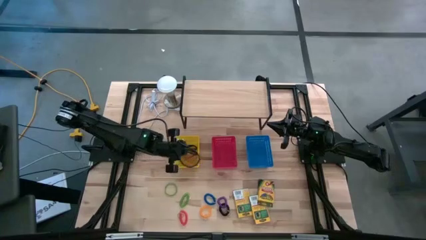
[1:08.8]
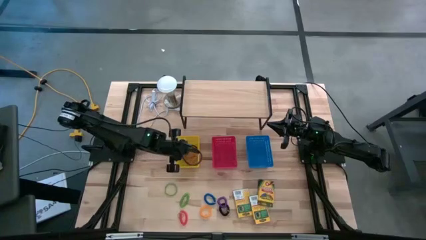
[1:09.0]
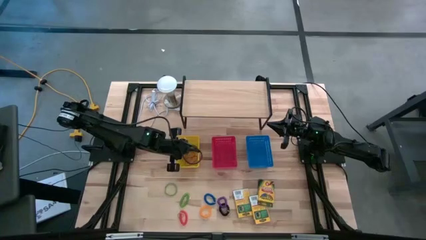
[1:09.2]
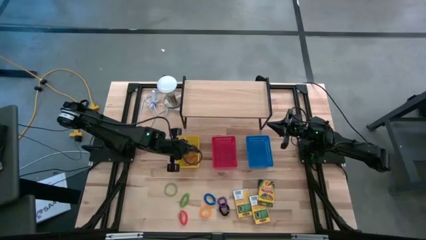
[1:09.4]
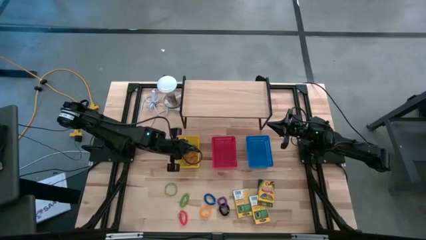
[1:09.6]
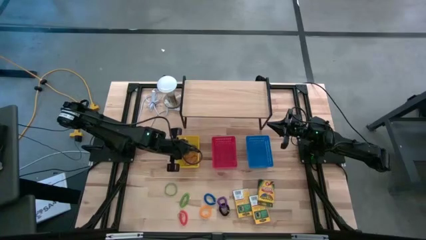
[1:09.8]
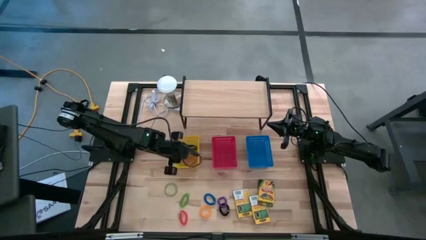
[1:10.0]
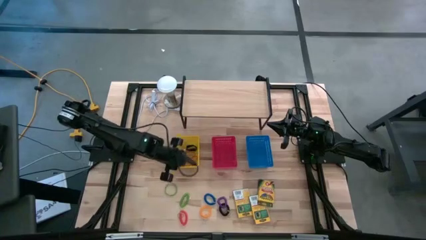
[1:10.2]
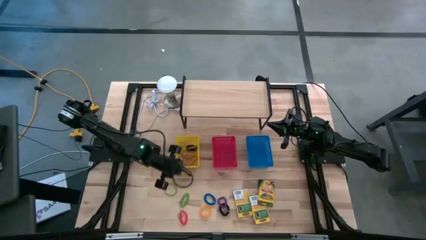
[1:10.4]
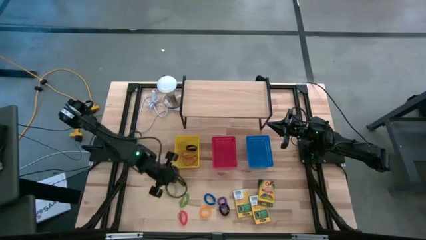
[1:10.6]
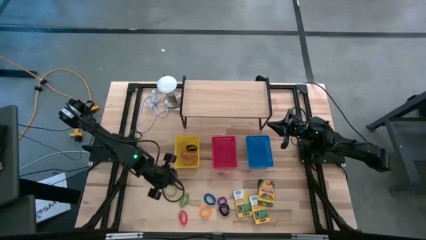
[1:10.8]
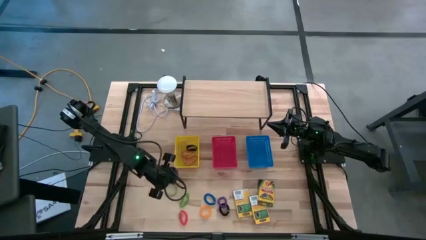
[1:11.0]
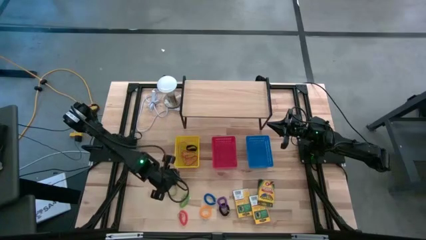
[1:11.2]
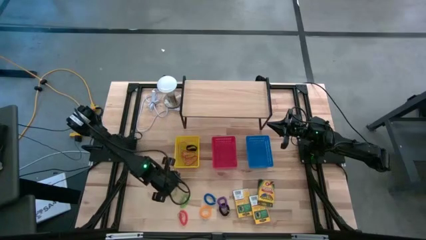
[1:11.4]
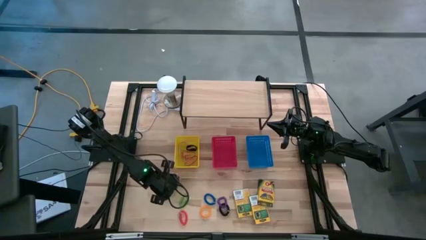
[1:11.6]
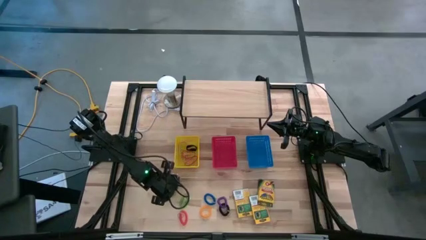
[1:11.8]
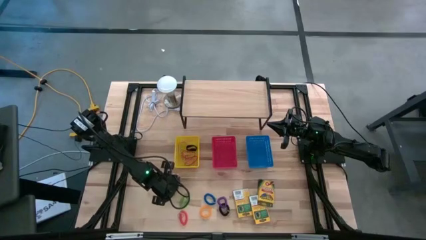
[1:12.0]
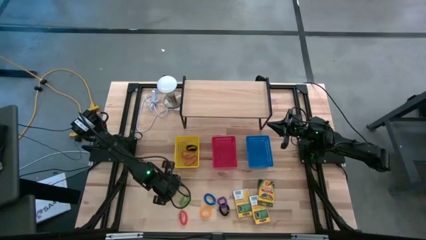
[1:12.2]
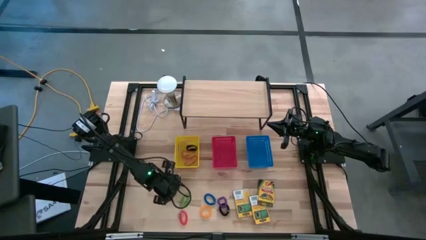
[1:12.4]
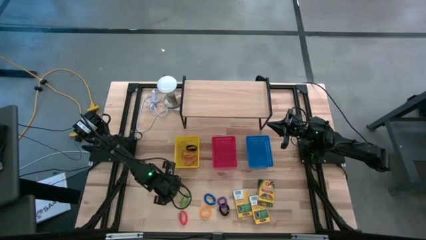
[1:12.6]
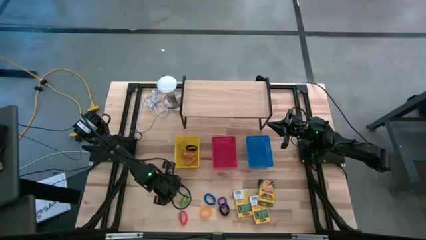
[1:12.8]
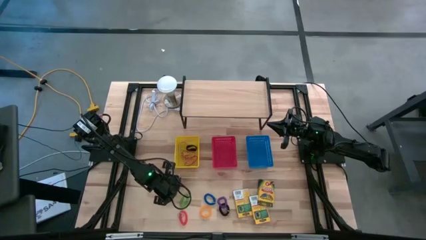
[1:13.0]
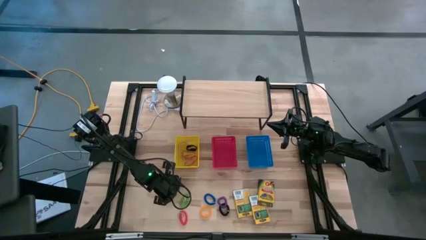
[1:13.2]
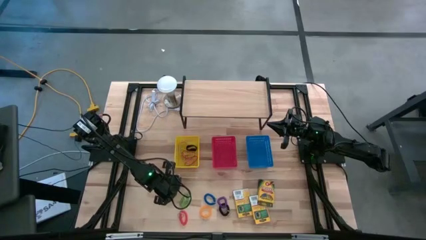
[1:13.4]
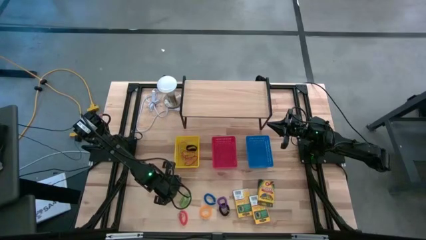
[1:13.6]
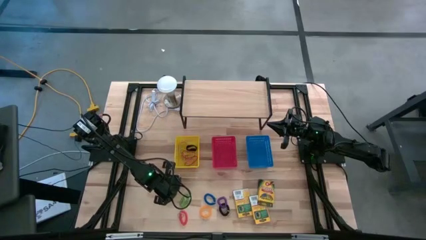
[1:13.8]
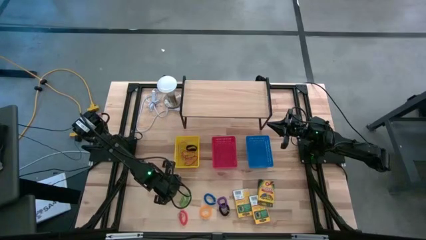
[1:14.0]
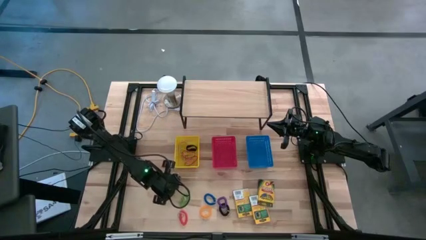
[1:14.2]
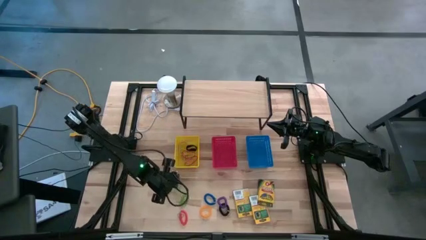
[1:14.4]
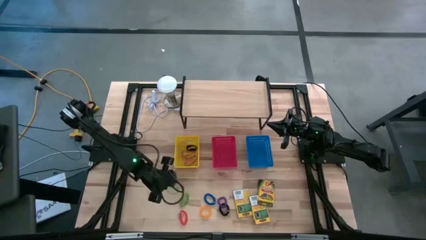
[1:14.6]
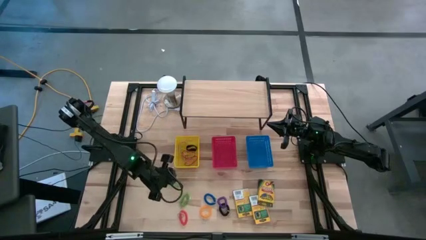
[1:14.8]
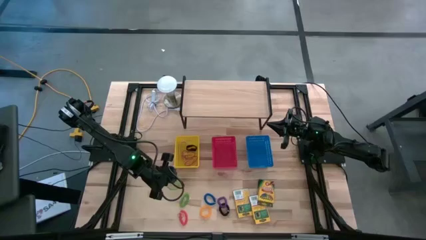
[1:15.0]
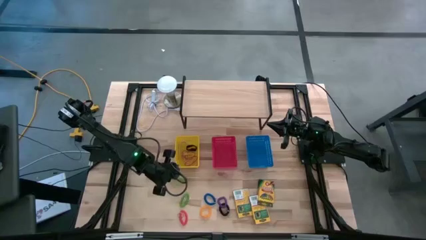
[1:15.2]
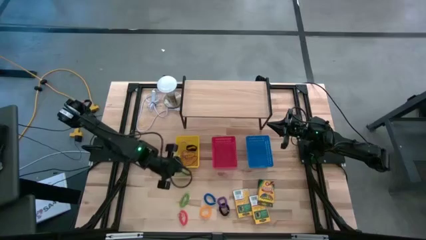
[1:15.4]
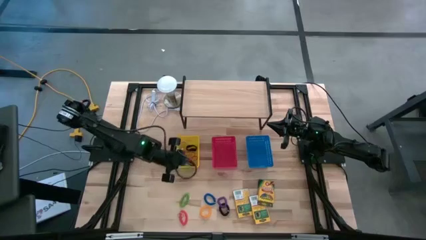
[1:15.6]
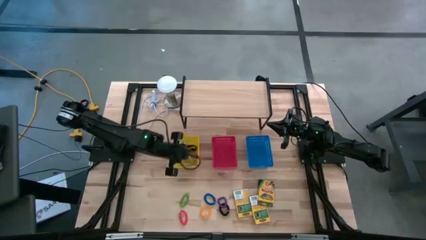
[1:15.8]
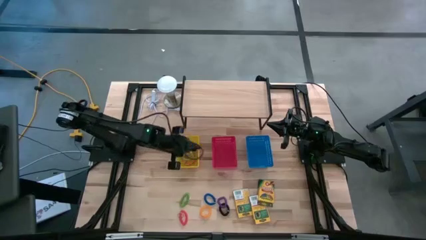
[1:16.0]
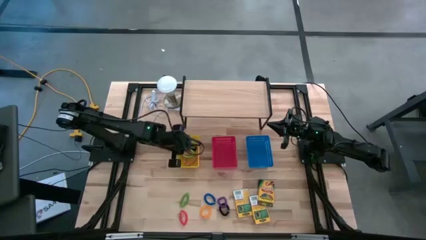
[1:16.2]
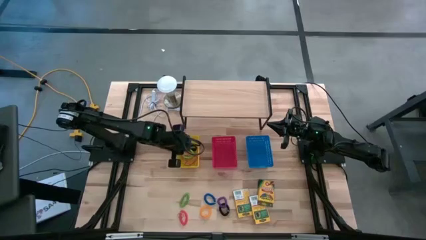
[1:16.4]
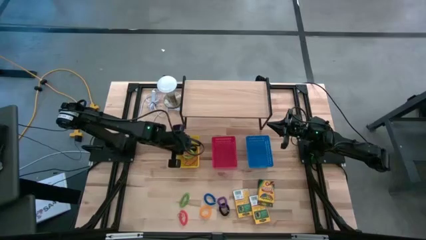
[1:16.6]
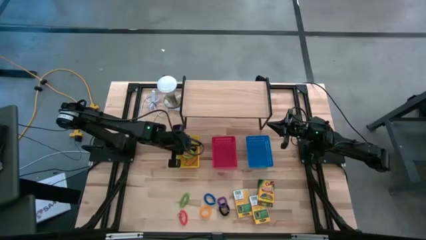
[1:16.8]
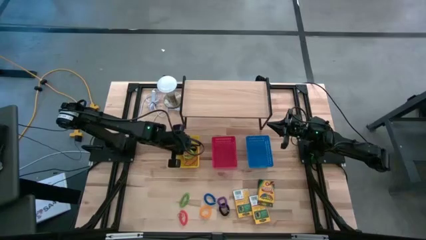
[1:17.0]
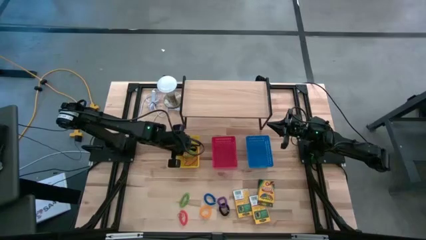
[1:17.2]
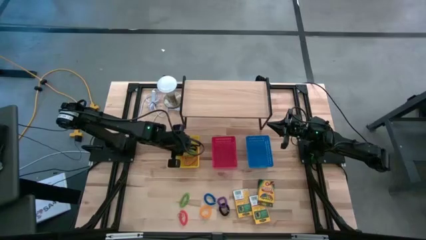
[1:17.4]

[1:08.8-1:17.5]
Task: Pick & Place Office Desk Supplies
Put the green rubber band into the yellow bin

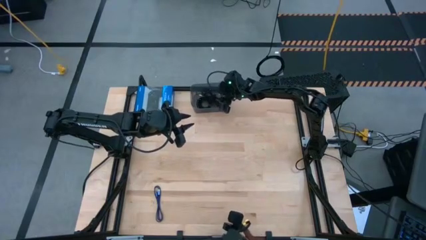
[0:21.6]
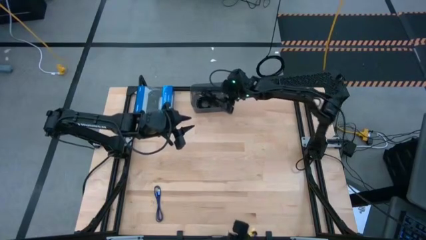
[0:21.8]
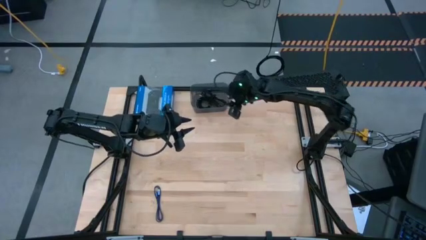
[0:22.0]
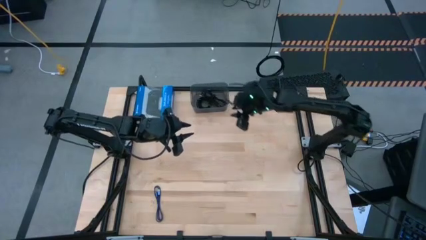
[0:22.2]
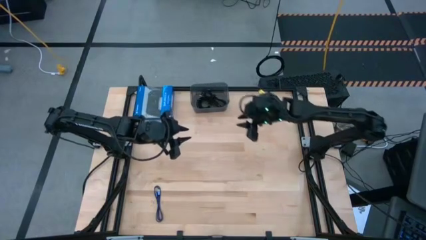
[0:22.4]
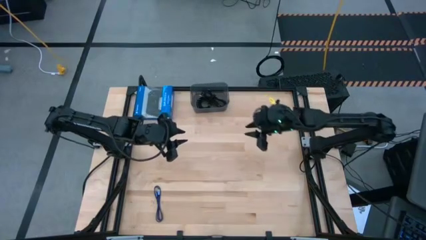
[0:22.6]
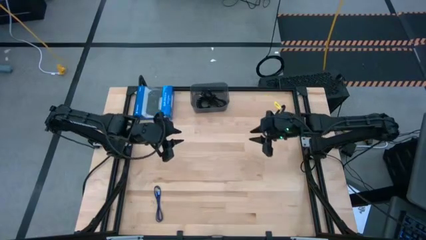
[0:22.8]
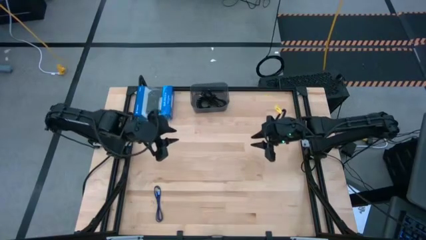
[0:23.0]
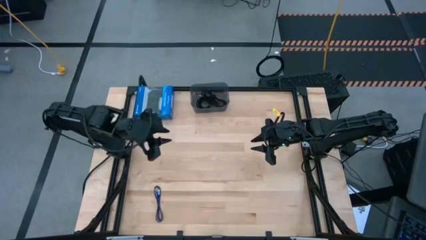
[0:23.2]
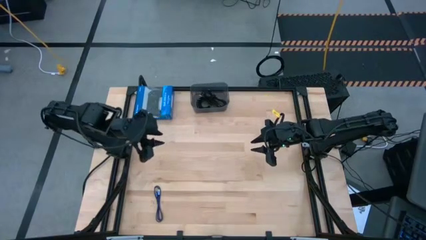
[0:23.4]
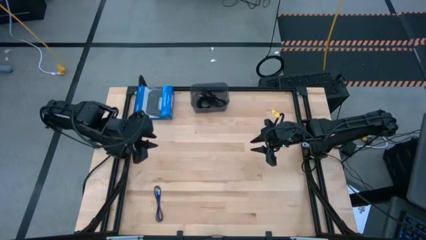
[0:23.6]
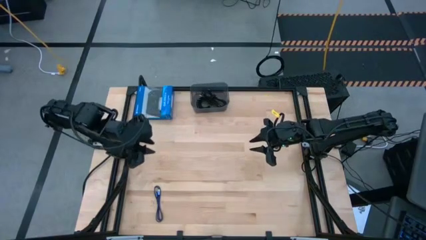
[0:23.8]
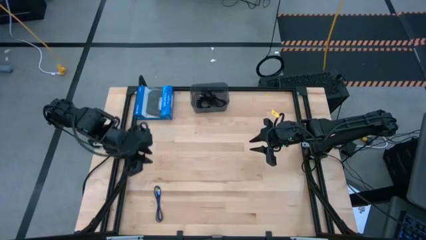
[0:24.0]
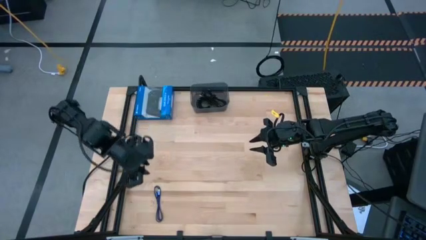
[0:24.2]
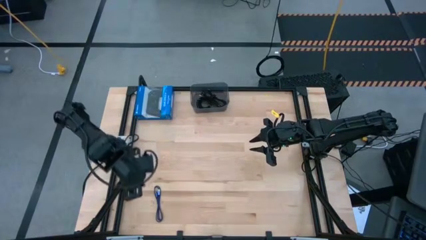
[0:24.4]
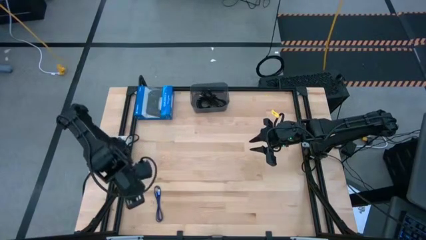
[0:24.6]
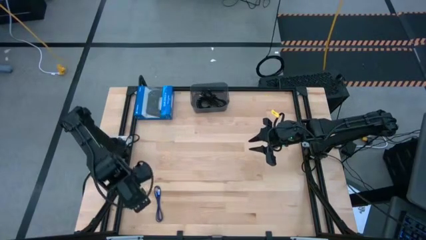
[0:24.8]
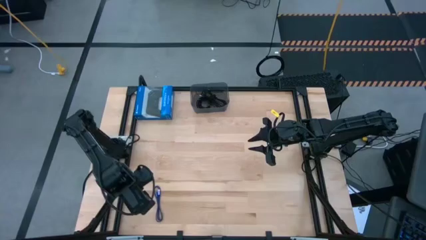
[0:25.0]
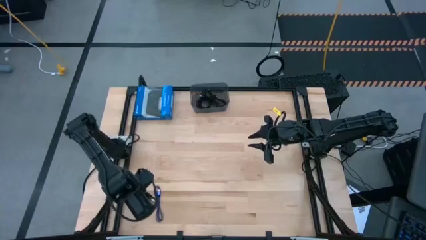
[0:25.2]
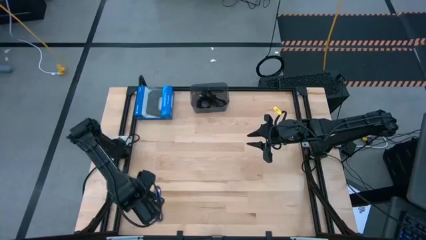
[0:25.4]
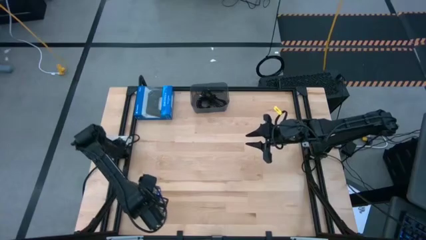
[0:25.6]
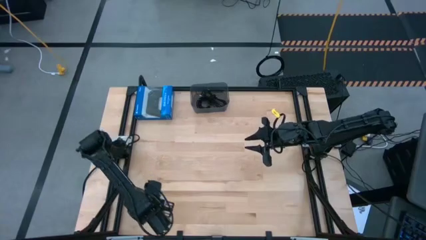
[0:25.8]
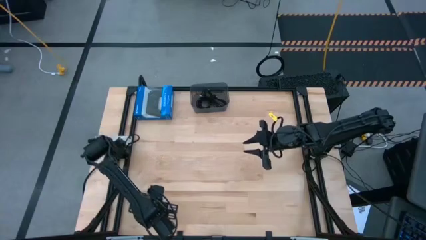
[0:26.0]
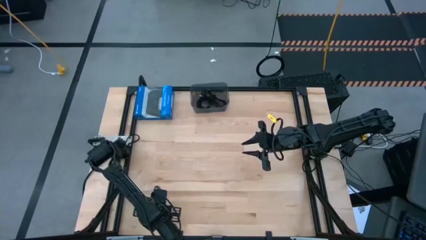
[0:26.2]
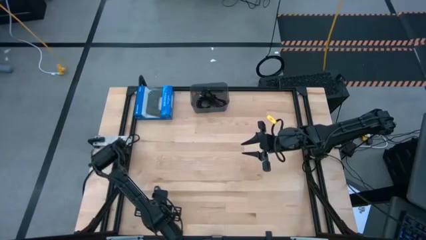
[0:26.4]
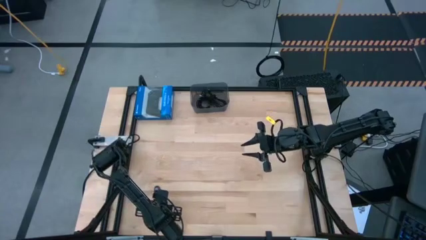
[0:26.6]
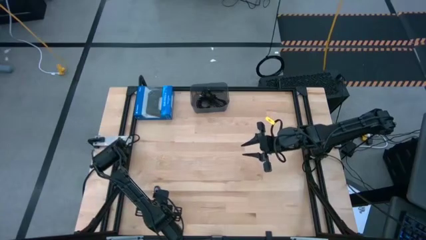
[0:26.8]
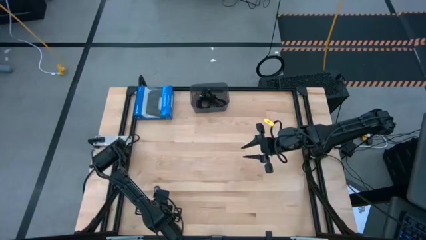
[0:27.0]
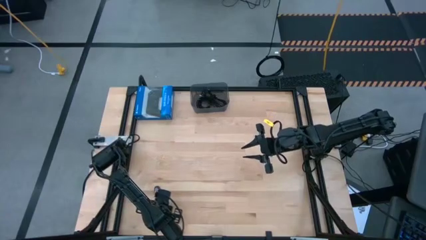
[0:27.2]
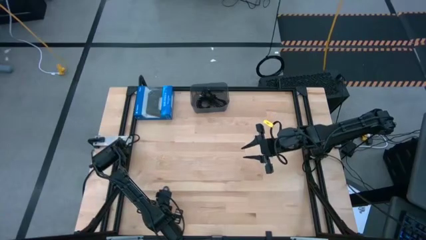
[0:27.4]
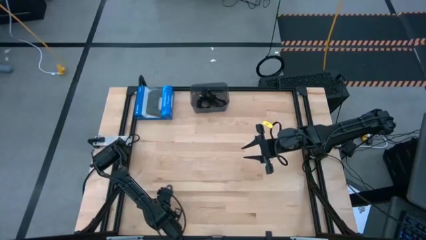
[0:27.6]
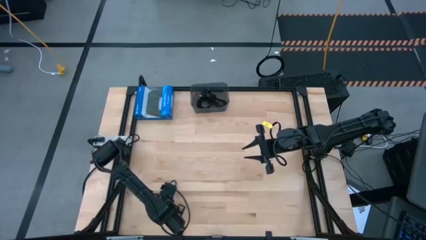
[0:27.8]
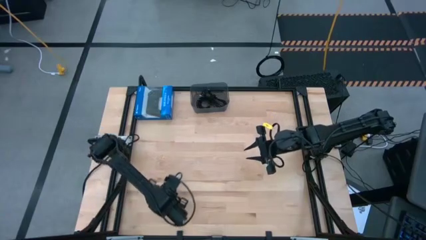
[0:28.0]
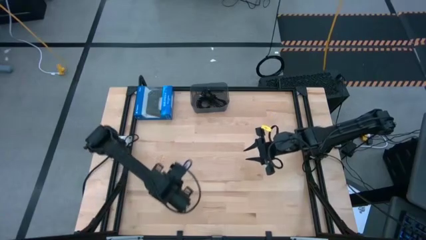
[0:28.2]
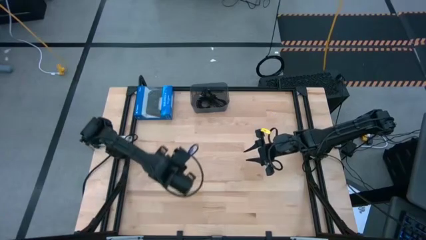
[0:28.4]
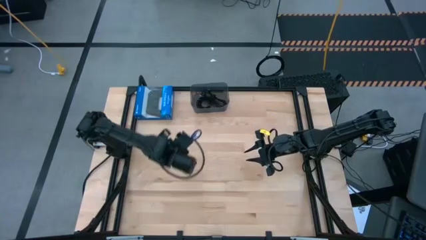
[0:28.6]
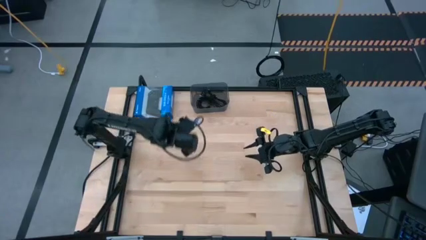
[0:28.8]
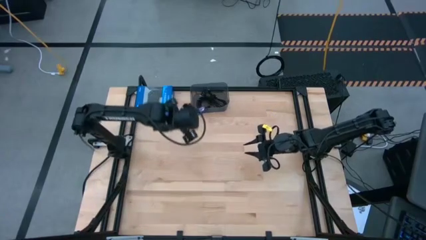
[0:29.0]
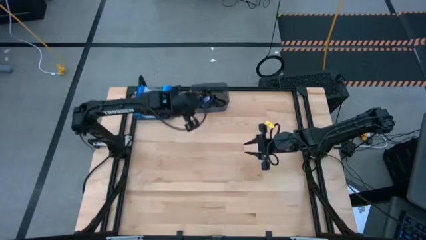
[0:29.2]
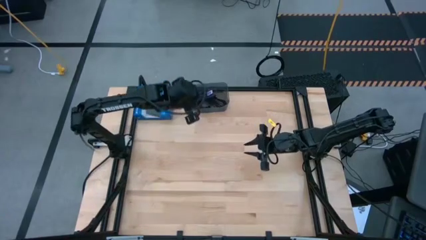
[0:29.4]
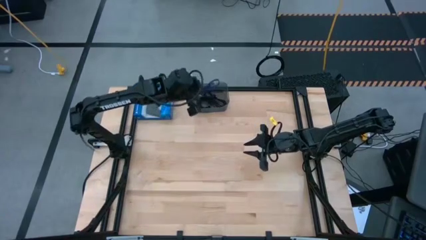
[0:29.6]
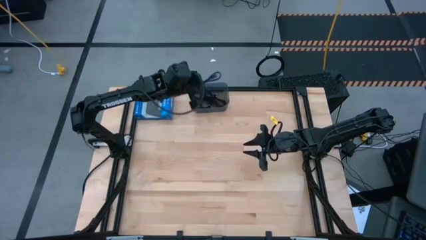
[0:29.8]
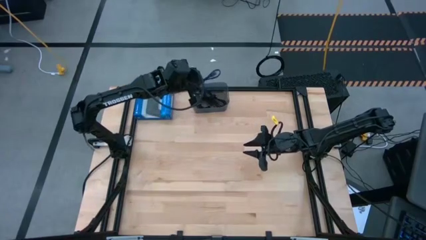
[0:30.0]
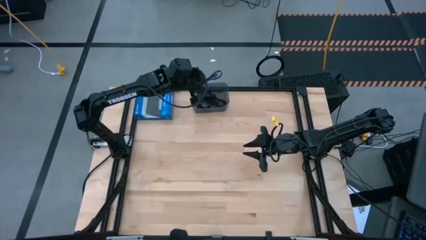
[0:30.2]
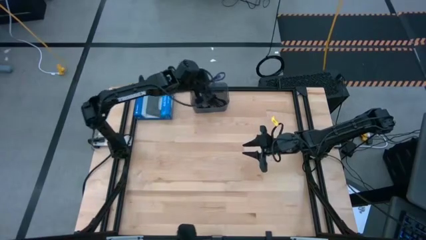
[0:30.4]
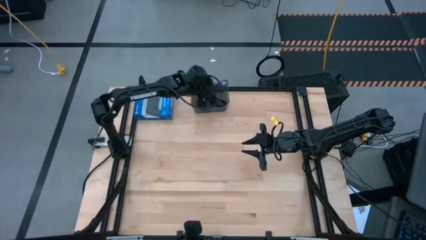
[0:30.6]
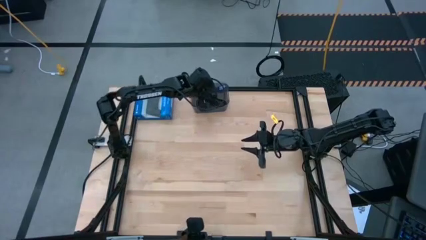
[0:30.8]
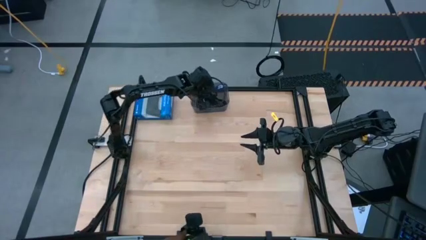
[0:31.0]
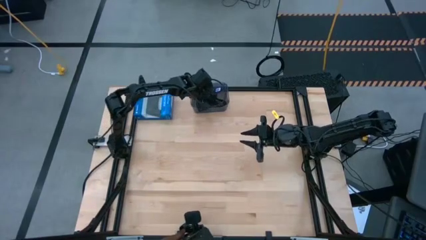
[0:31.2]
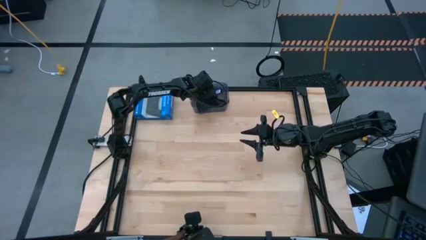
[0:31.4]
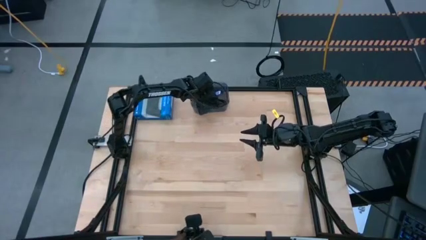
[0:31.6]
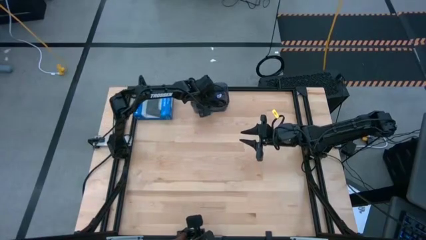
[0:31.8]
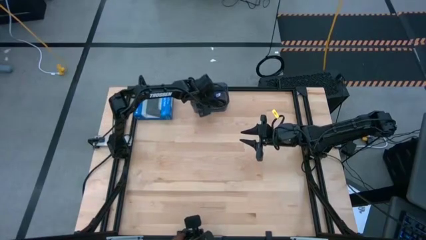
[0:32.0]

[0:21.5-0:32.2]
Task: Pick and place USB-C Cables
Put the blue charger cable into the black bin
